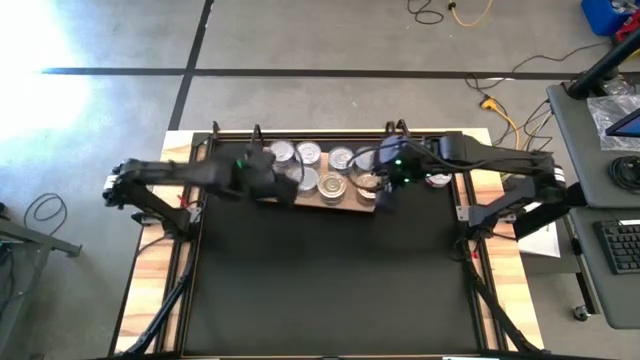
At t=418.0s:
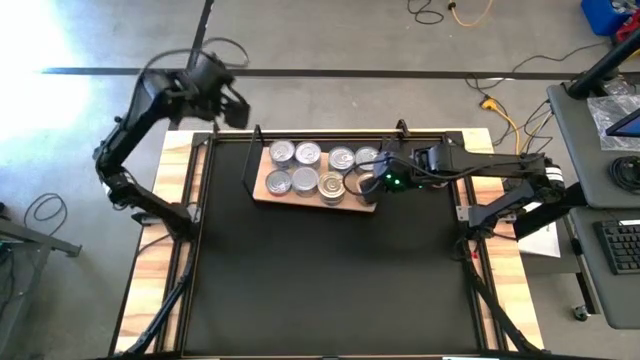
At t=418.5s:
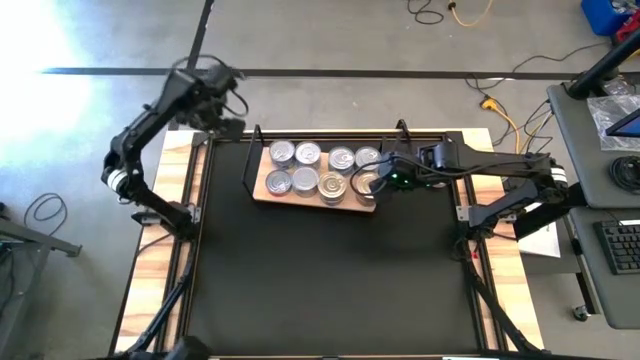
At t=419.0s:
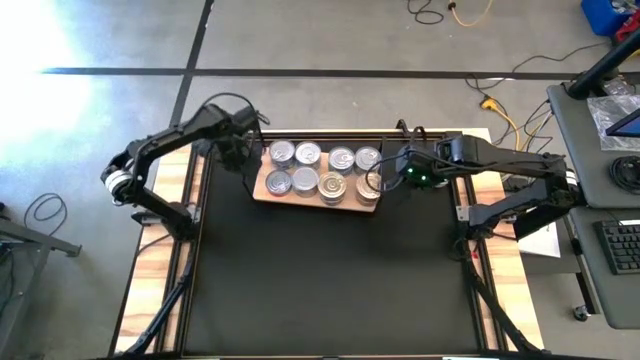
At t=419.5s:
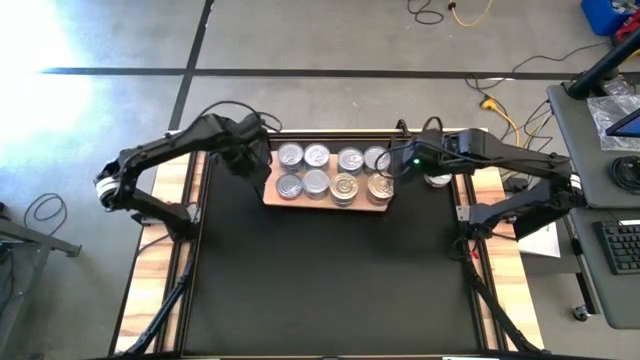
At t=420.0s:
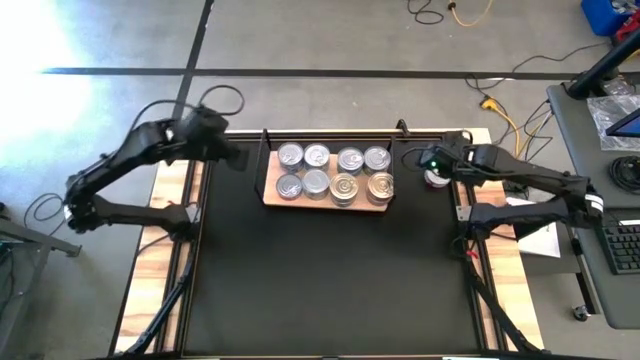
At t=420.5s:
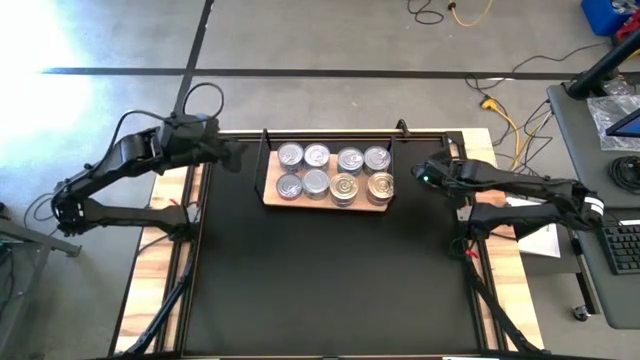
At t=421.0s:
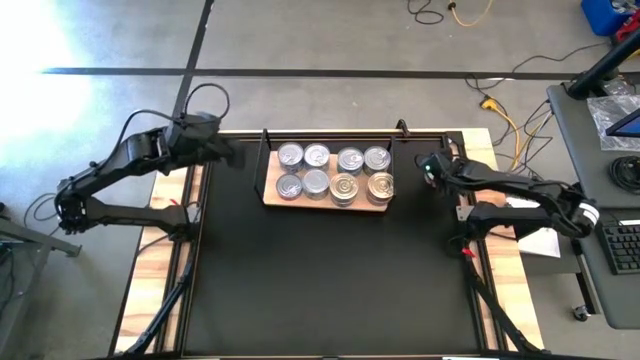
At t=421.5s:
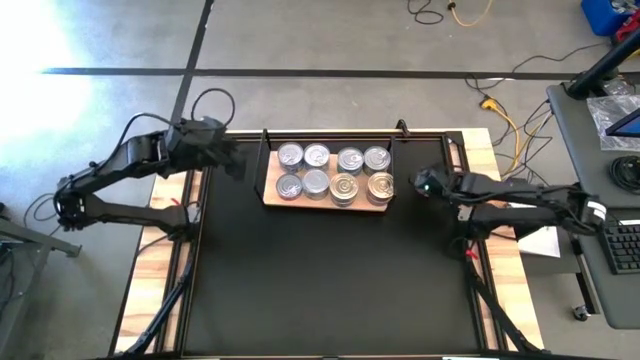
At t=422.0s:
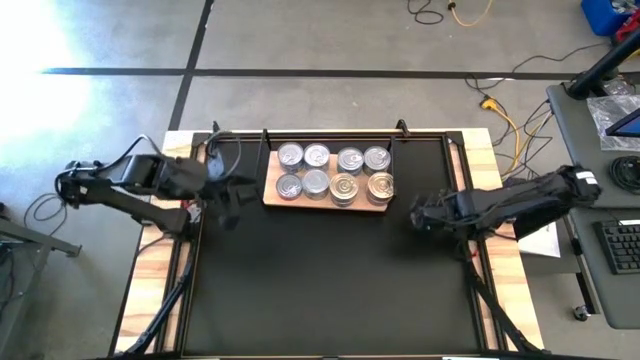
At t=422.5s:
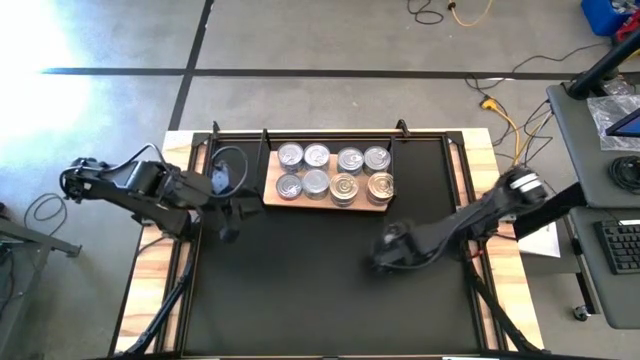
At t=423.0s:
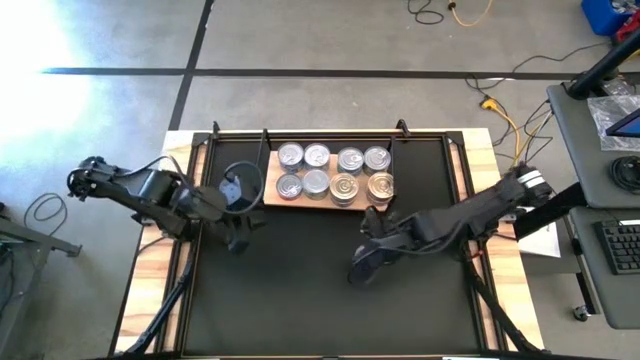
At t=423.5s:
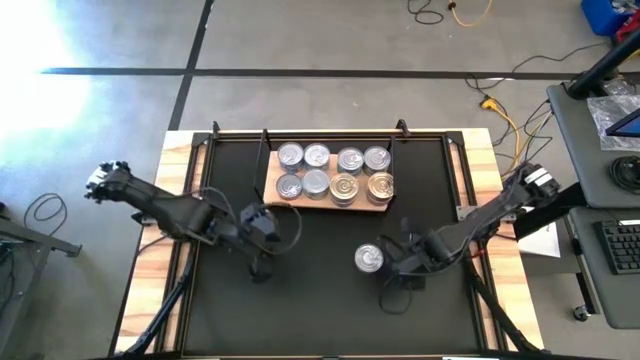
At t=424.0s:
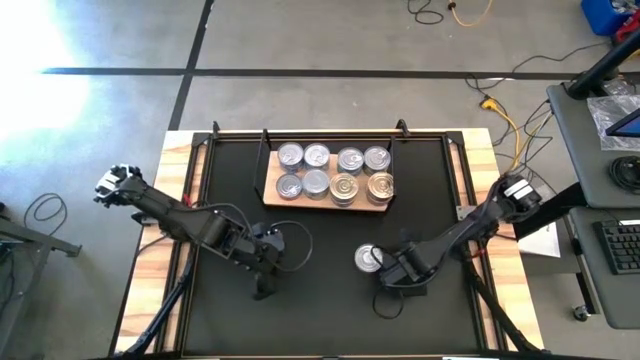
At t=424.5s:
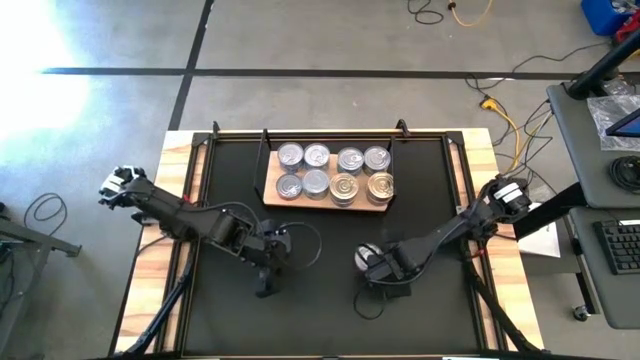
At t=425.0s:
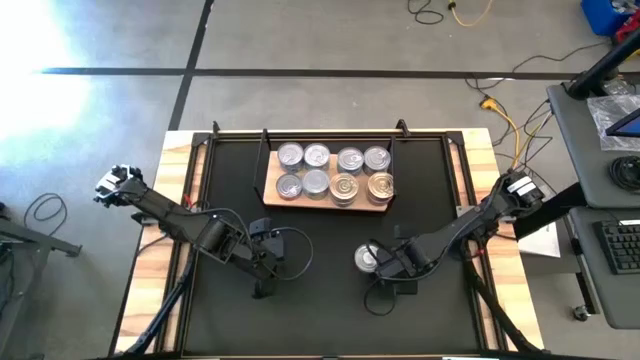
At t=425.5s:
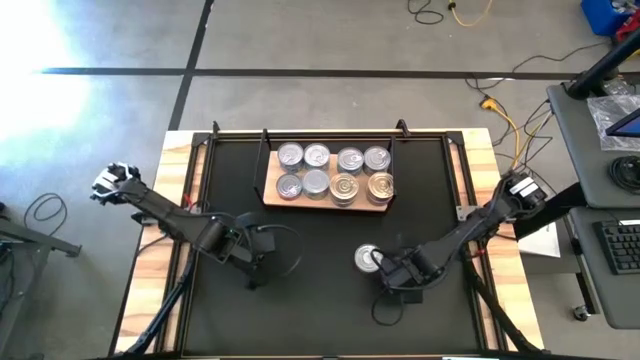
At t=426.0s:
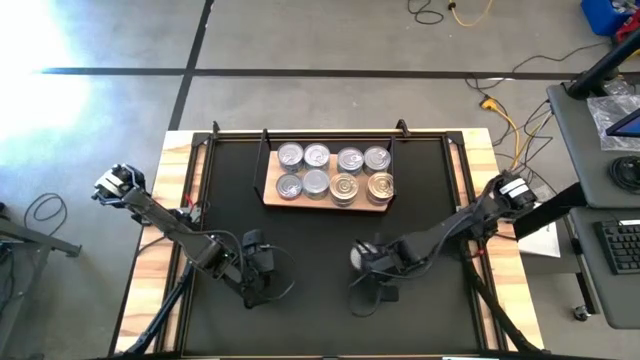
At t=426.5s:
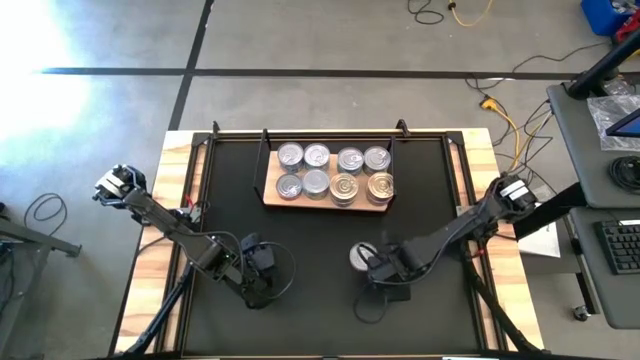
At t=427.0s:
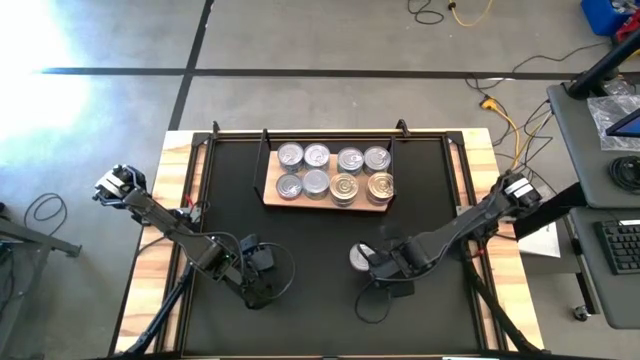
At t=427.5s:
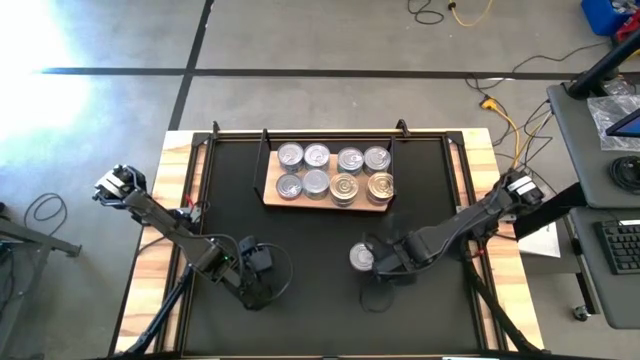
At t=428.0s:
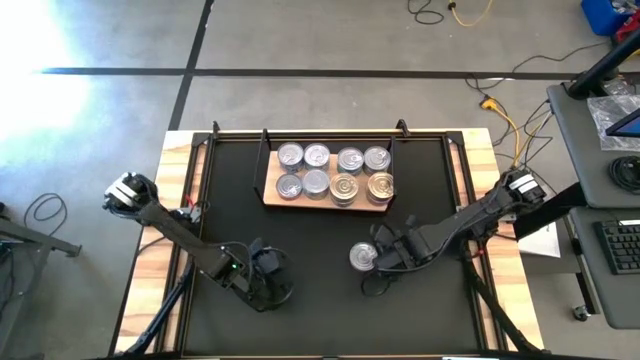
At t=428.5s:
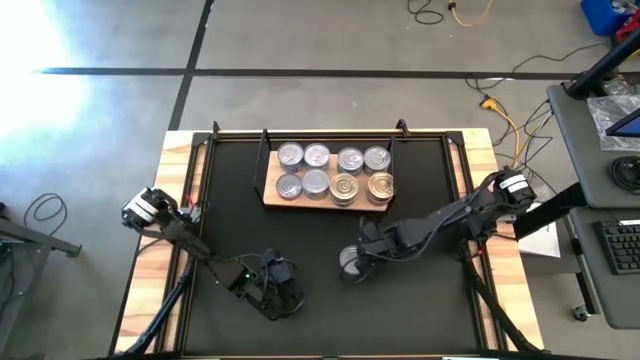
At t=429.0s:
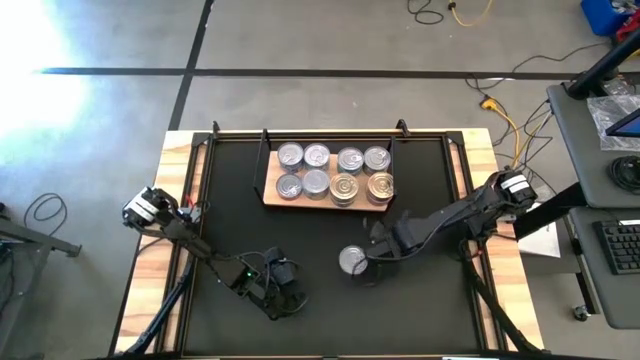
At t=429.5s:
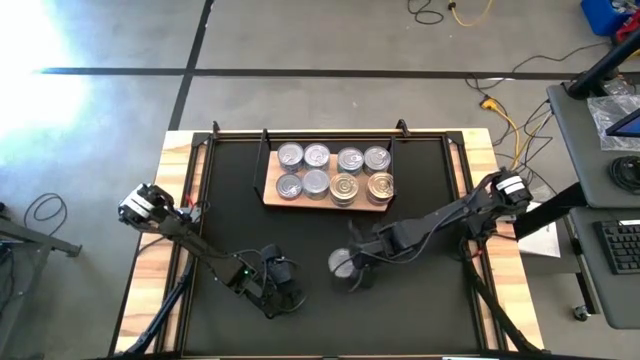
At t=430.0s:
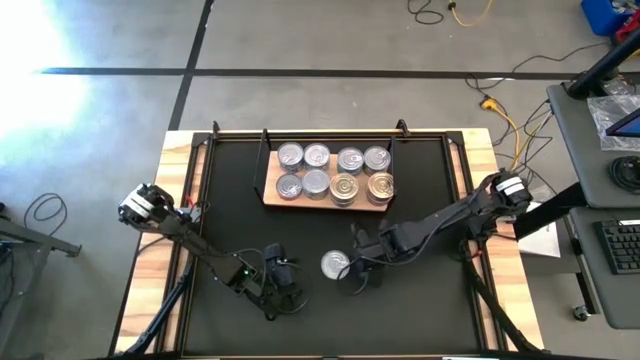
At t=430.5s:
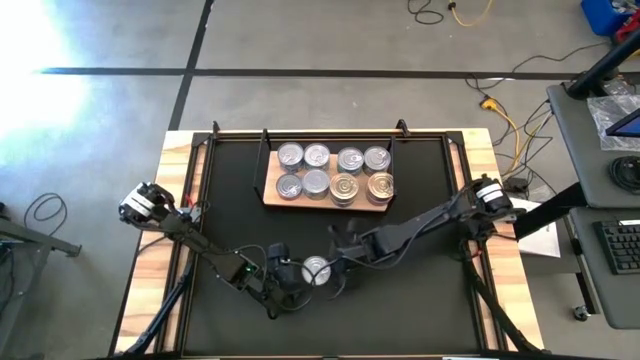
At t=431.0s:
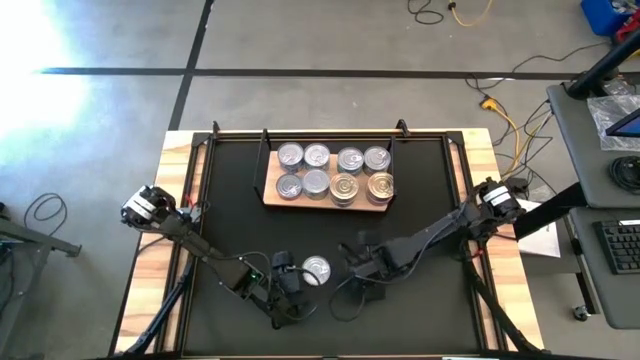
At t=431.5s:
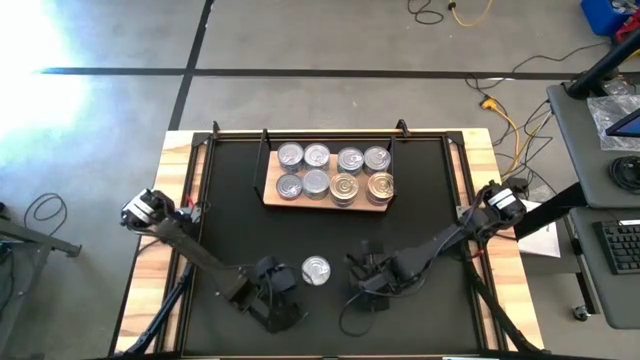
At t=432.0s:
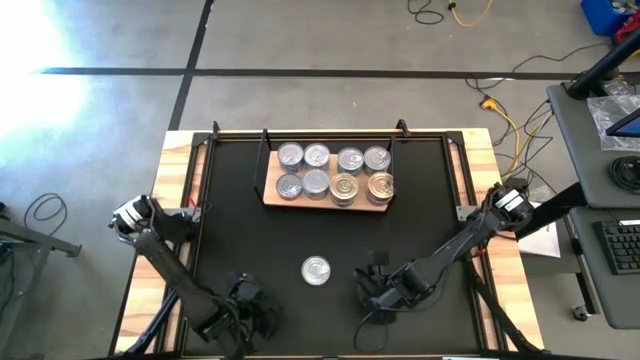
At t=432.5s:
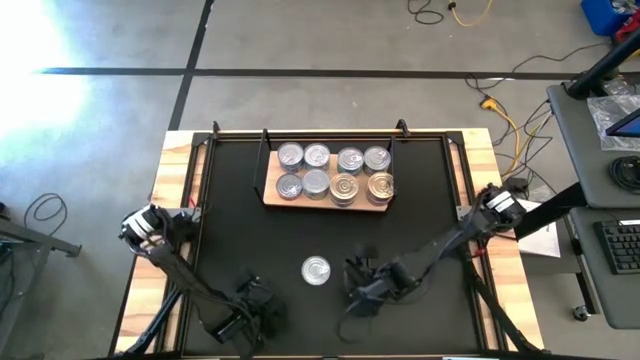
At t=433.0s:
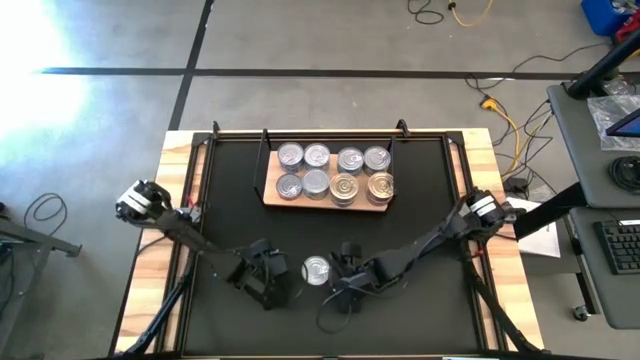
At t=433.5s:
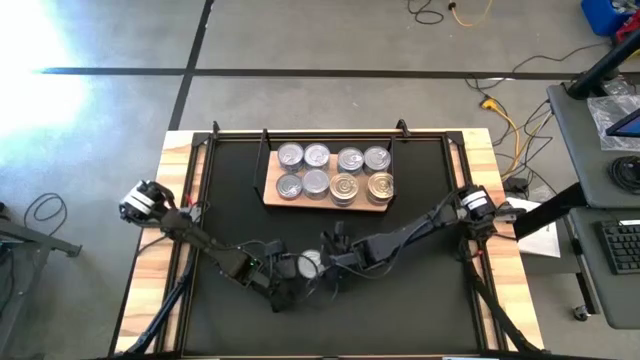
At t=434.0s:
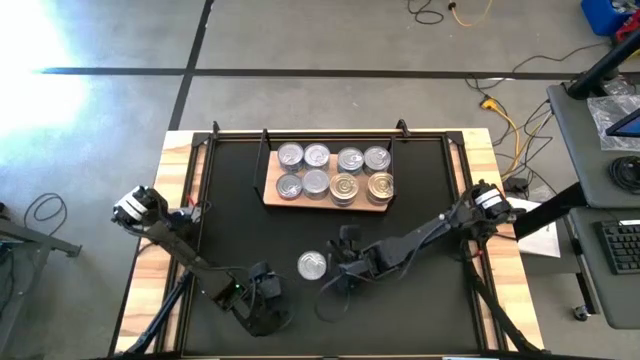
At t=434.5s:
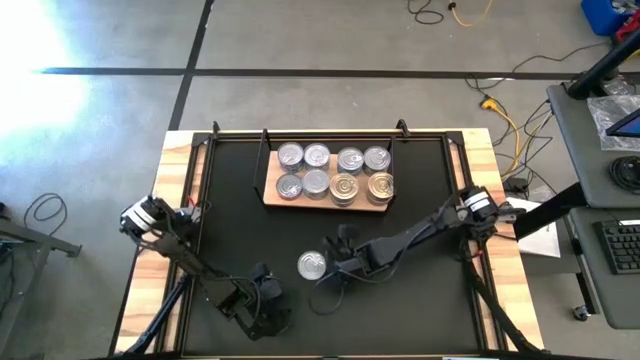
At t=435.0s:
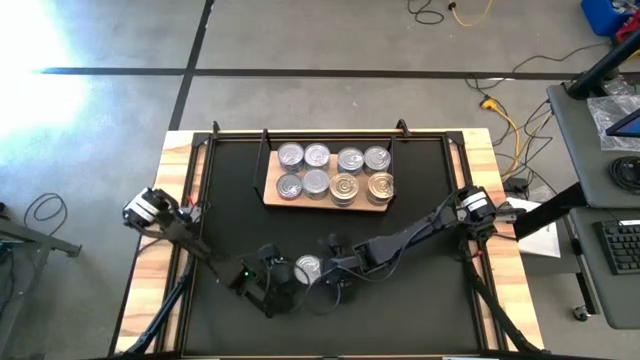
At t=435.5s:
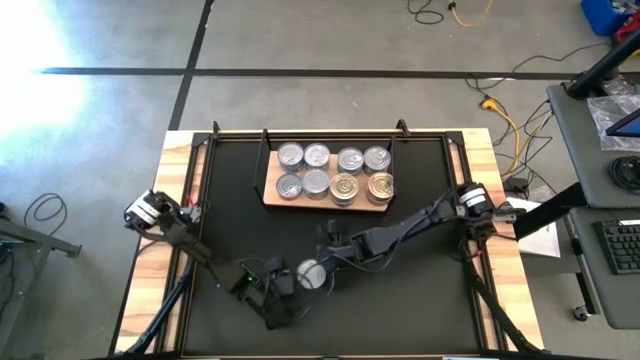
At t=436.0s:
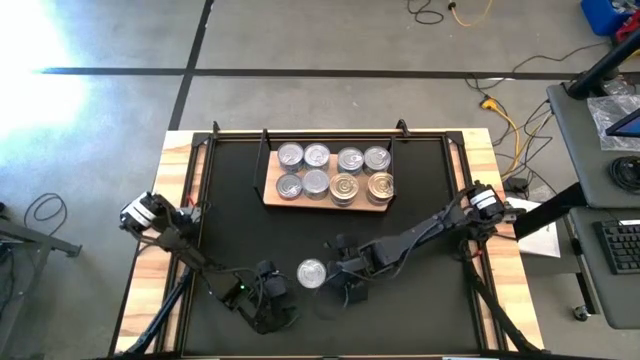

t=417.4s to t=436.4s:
Task: Stack canned seafood by type on shelf
Stack the red tuna can on the red tuna can

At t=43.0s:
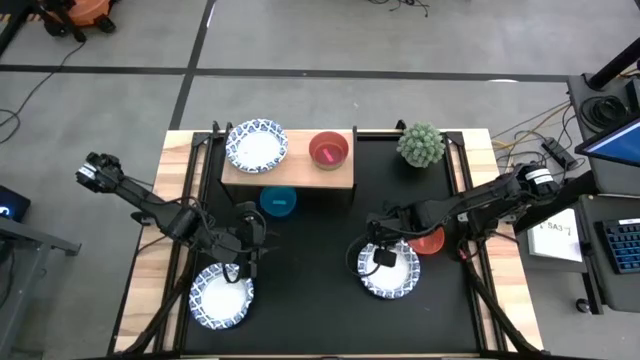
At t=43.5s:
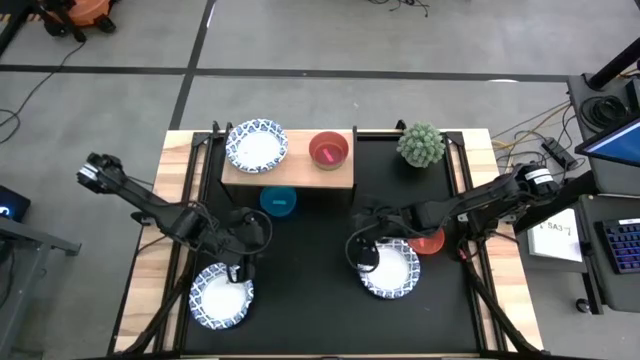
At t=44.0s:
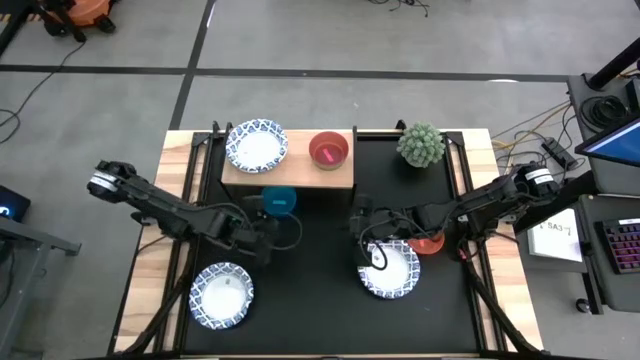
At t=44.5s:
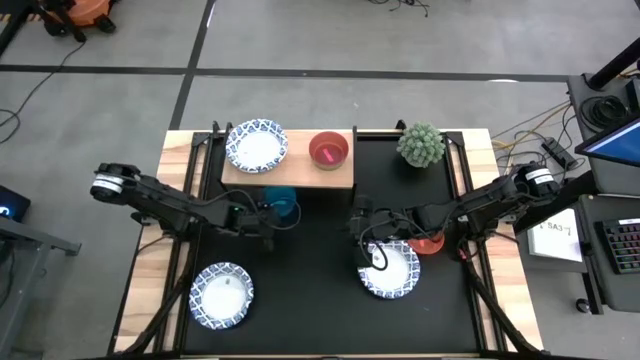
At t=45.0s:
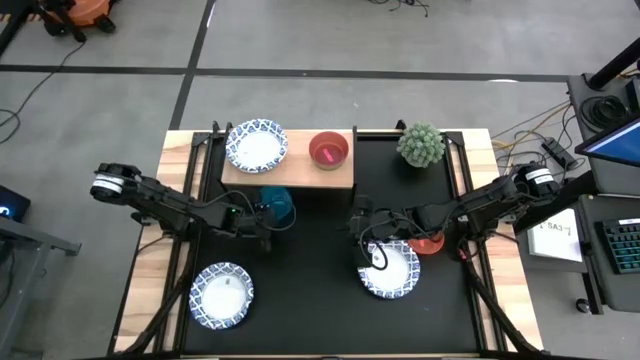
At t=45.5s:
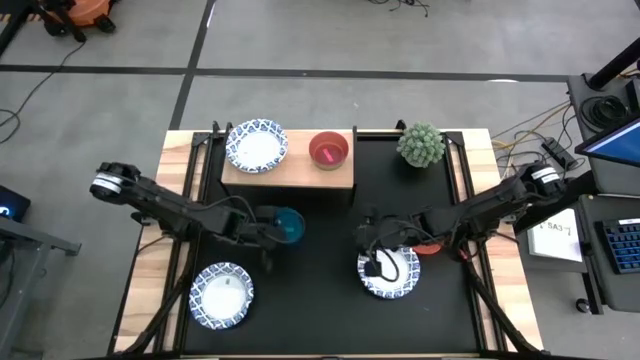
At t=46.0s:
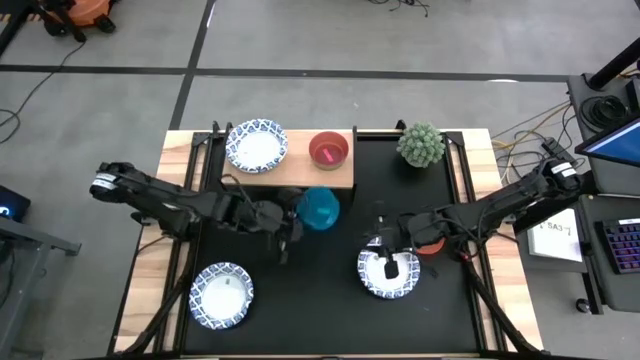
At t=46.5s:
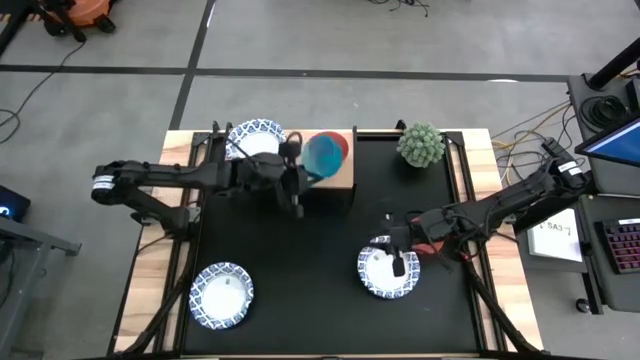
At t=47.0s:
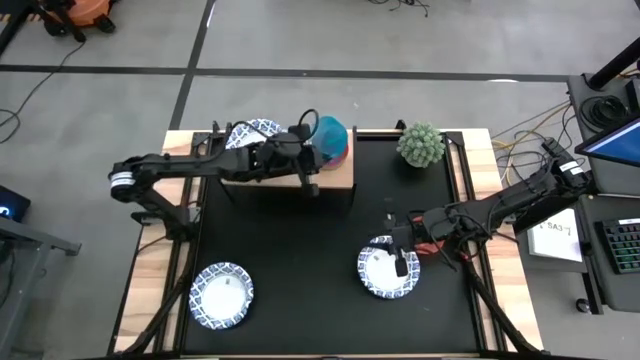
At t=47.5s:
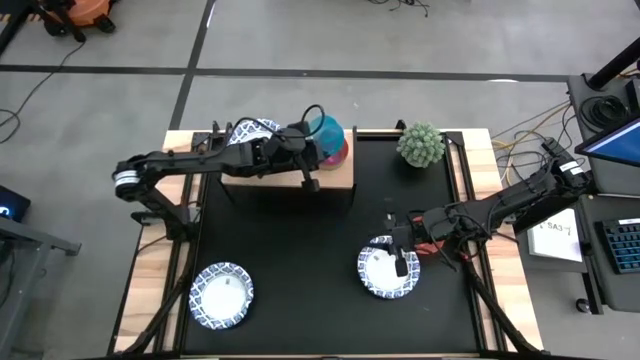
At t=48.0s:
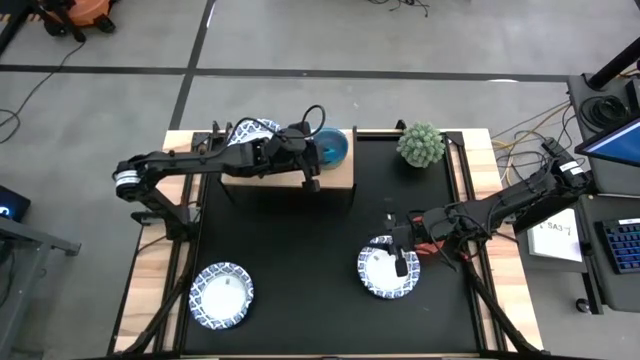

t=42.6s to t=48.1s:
Task: Place and stack bowls onto a shelf
Stack the blue bowl on top of the red bowl on the shelf
